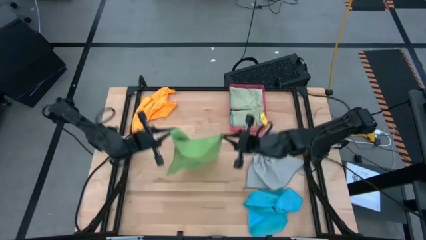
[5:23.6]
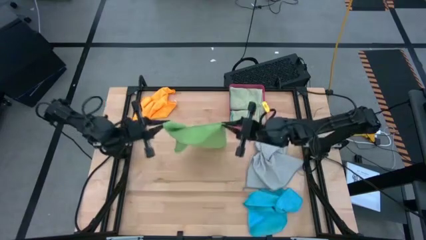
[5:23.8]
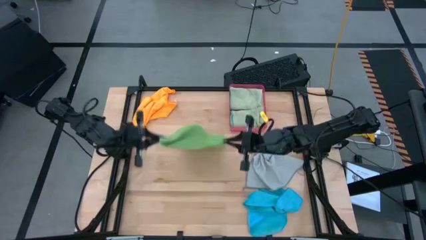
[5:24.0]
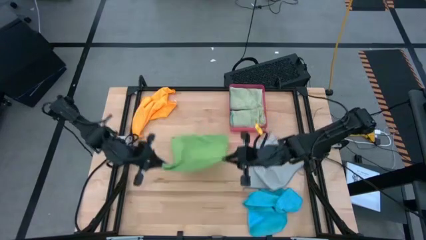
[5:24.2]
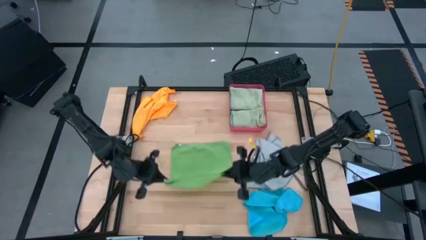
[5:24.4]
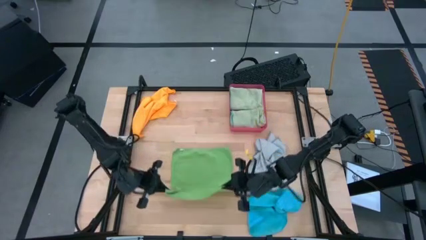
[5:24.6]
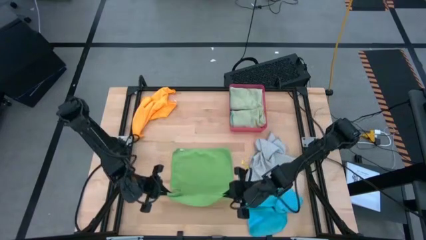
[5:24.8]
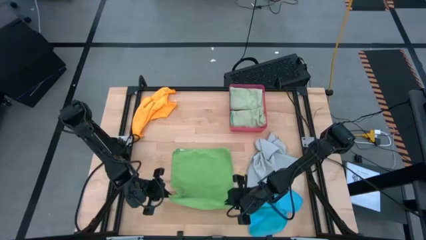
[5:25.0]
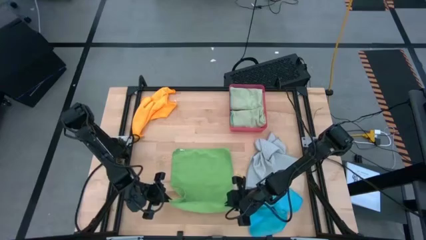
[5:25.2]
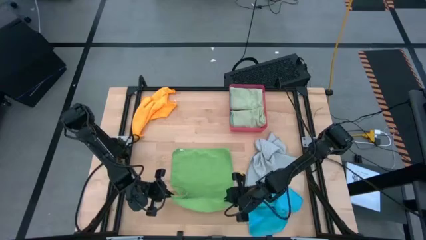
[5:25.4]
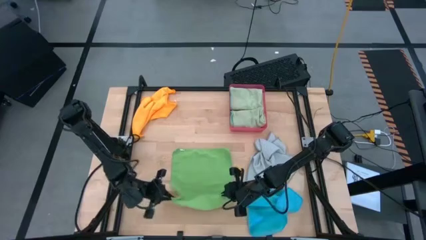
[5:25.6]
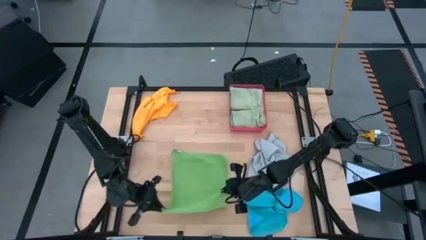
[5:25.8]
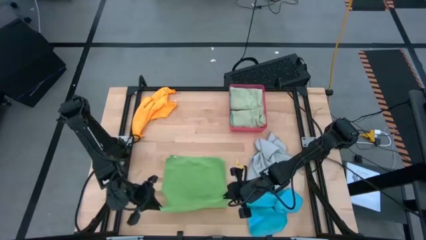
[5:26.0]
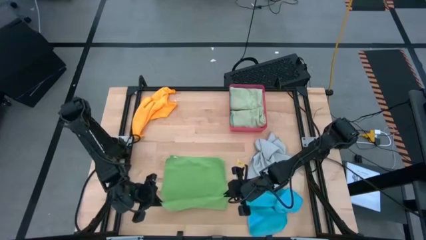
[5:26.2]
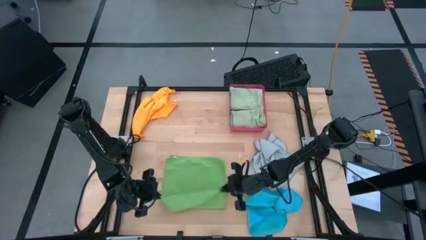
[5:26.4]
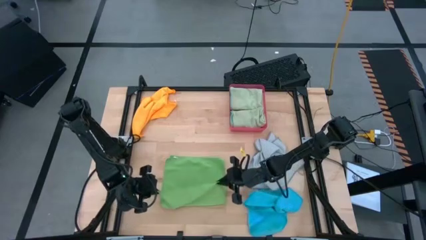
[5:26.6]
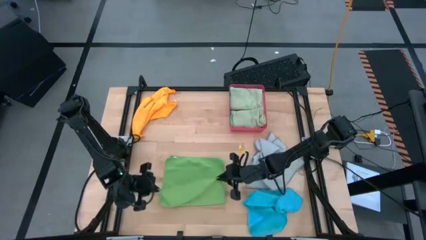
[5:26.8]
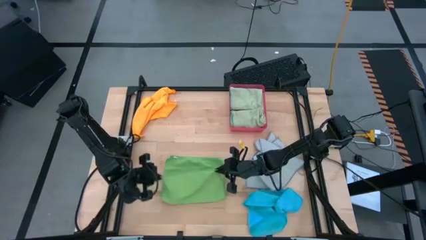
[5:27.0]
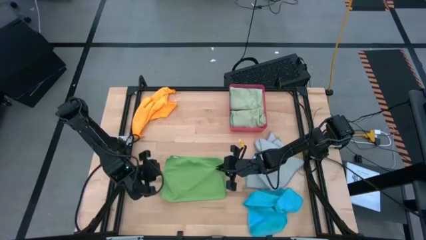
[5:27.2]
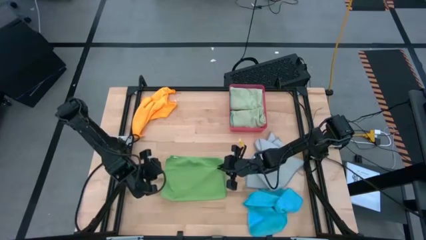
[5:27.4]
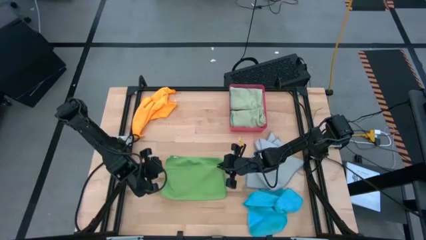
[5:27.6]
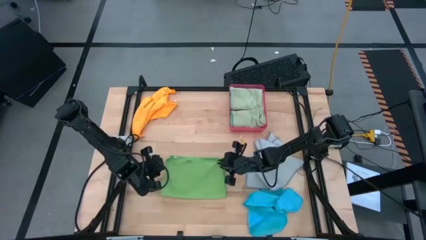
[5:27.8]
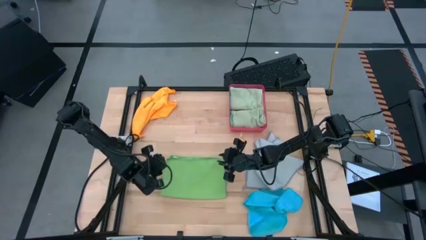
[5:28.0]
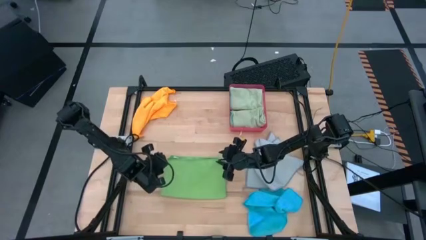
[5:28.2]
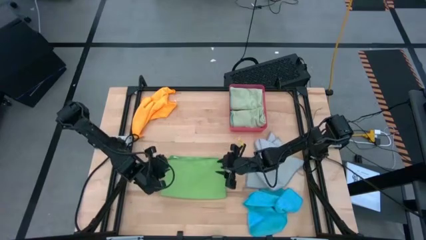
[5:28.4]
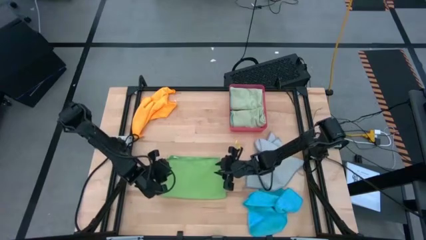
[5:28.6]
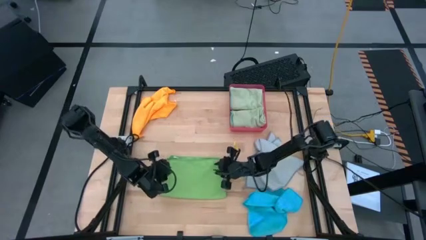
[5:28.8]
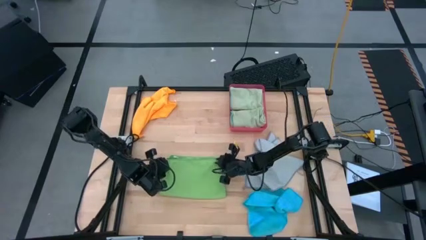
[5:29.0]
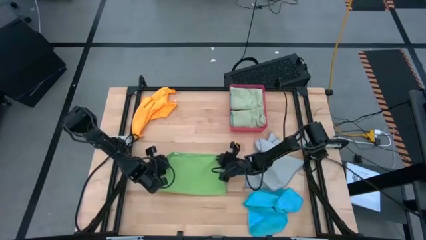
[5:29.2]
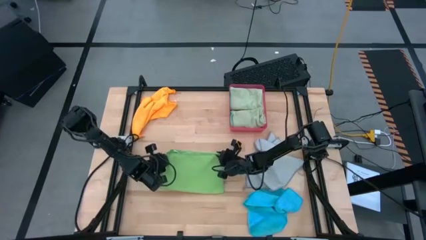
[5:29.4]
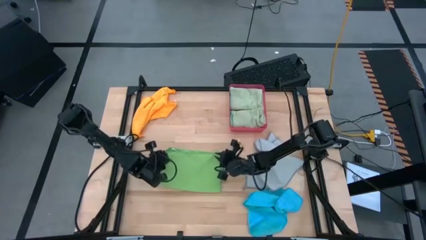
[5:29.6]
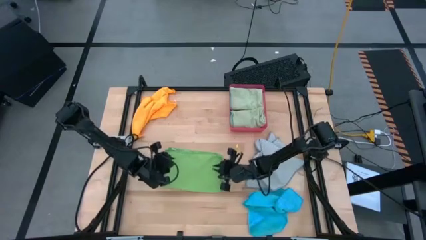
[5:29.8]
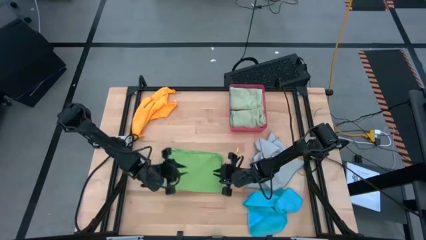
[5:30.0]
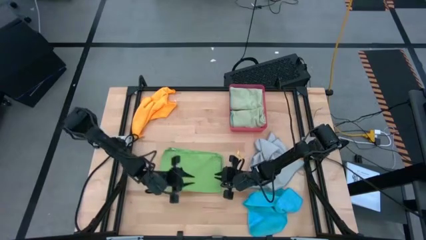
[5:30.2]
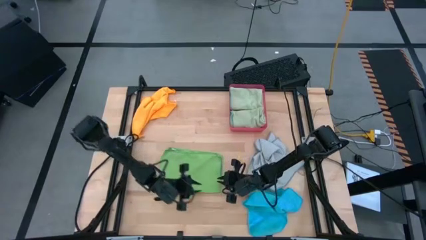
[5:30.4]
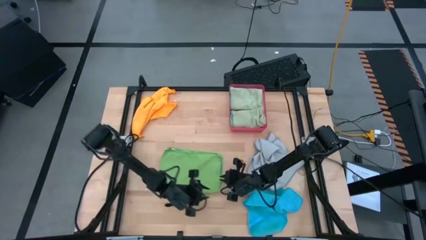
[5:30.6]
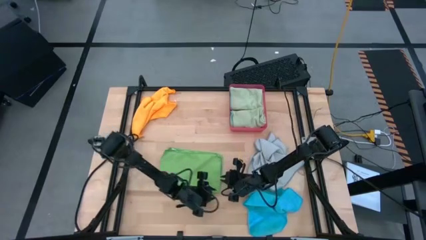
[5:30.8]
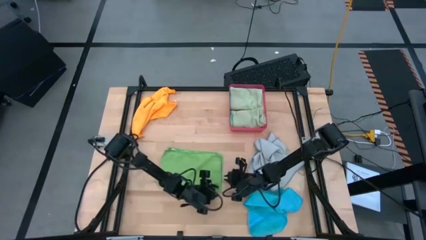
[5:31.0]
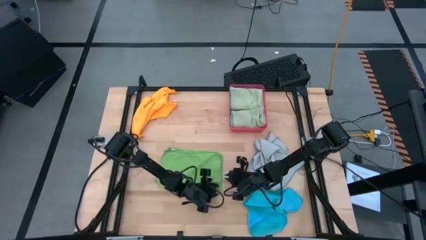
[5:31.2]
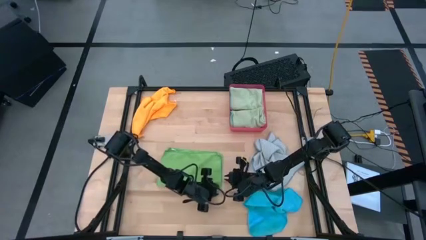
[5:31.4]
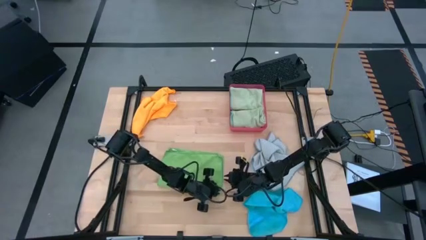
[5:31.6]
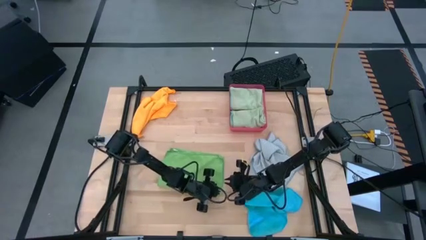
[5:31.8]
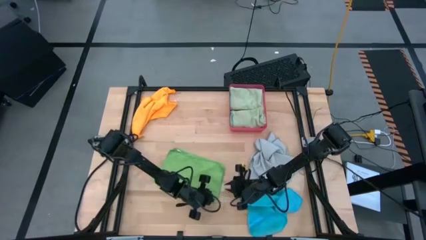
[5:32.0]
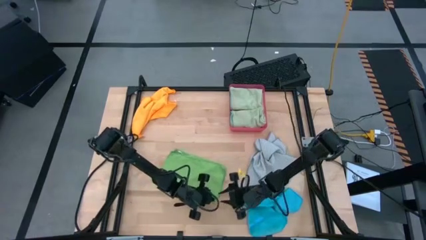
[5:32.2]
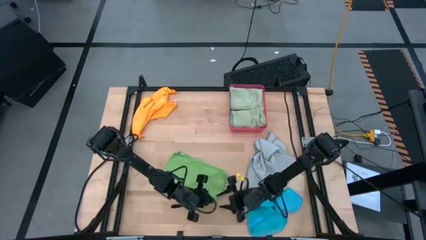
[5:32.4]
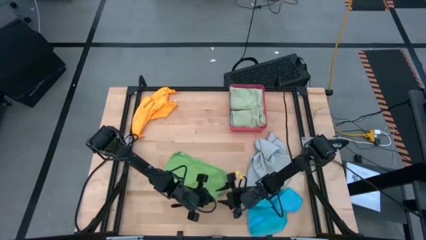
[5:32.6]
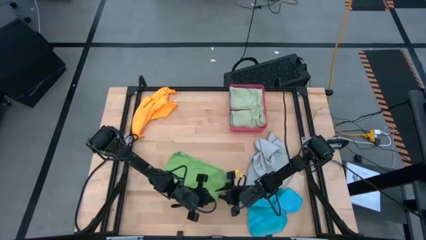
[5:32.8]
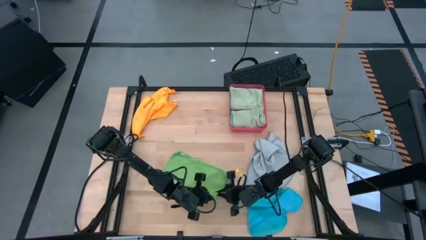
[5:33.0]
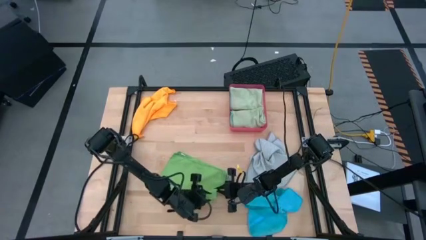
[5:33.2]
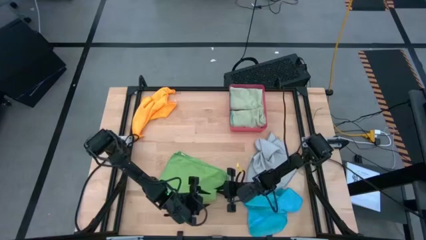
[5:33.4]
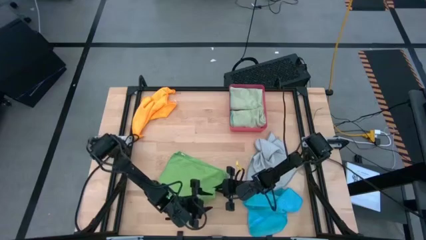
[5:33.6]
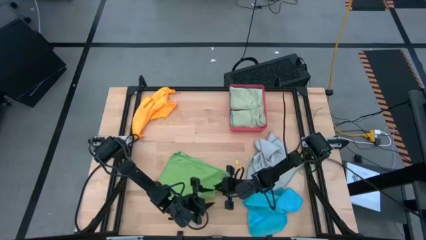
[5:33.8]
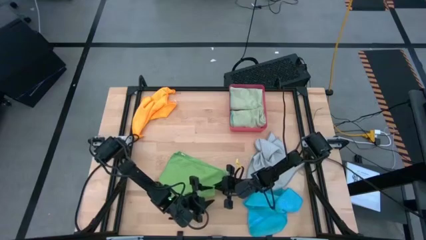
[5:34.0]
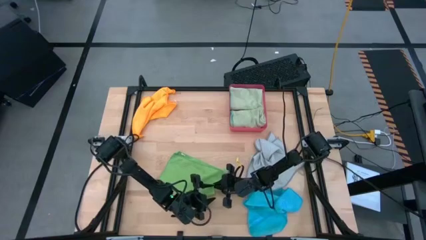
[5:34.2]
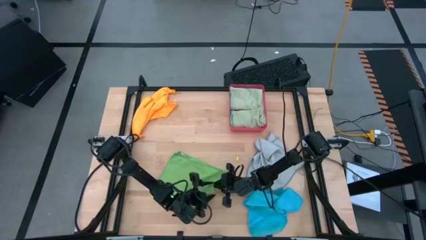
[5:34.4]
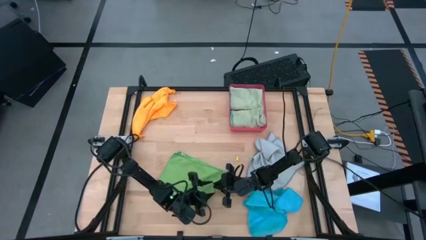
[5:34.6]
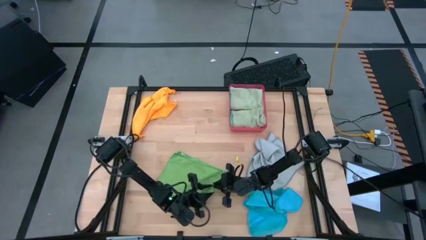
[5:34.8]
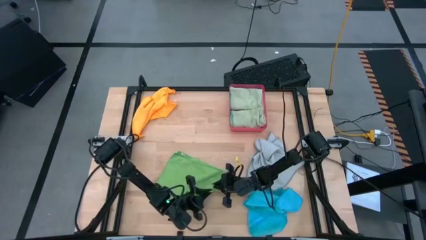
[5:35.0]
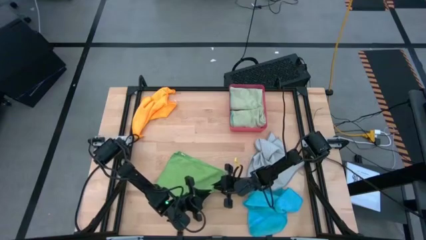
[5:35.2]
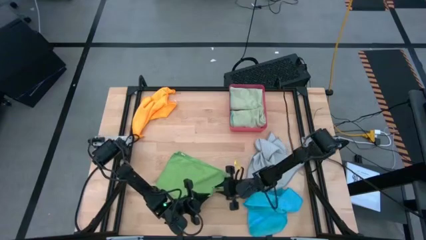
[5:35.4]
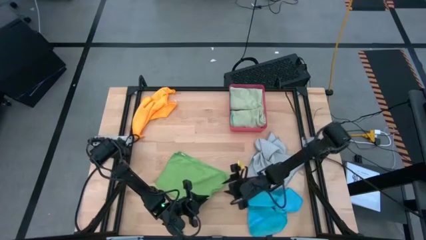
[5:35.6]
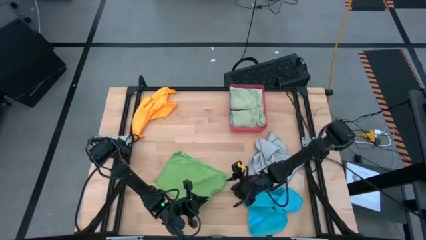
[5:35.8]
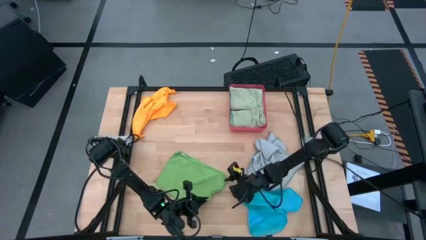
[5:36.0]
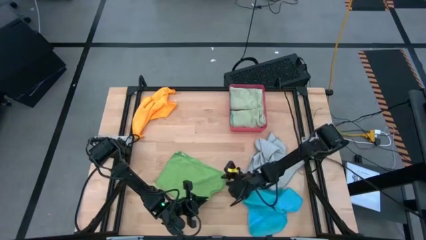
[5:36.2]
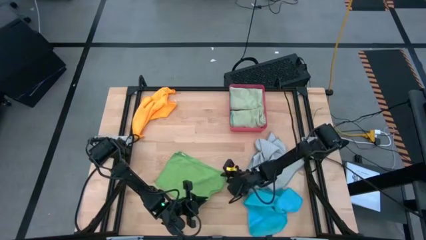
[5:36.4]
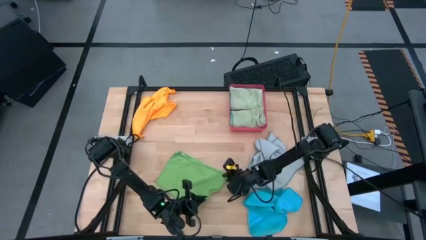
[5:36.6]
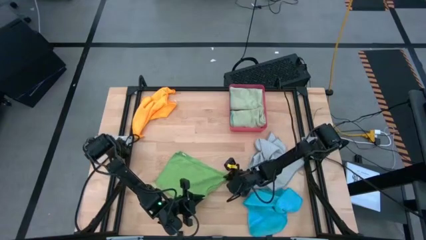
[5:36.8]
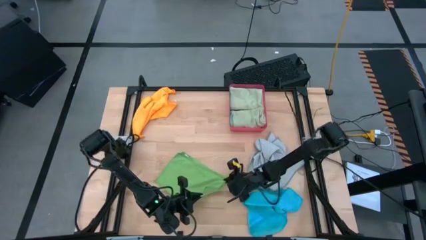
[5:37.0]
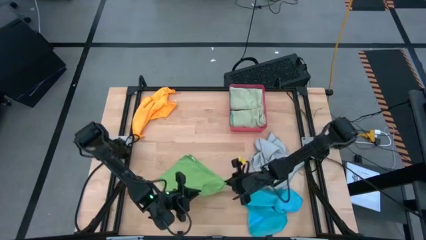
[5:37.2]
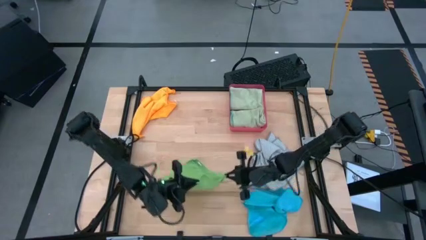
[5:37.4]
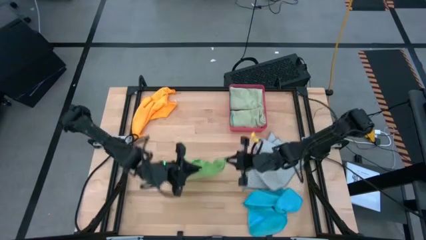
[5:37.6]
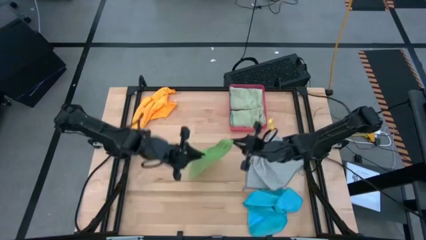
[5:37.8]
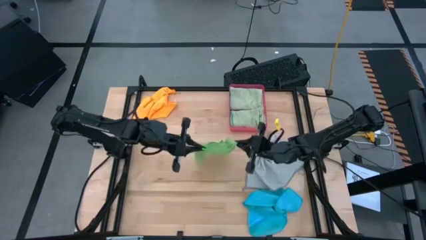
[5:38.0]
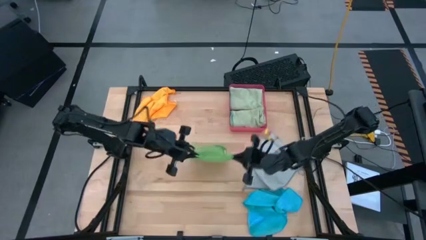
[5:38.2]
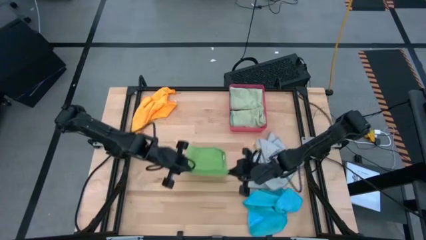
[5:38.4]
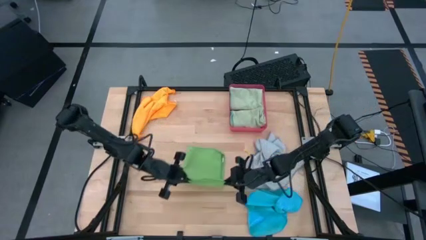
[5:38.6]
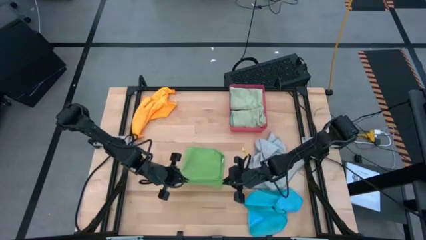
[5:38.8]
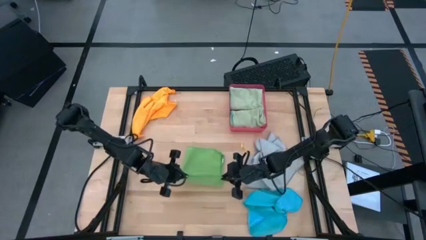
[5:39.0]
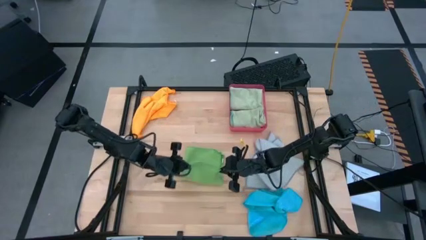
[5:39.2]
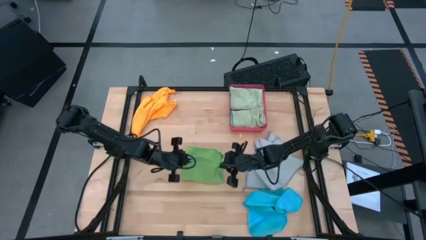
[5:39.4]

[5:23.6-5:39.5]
Task: Fold microfiber towels
Fold the dark green microfiber cloth
